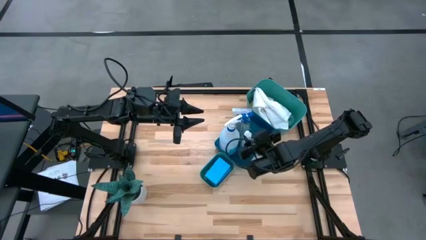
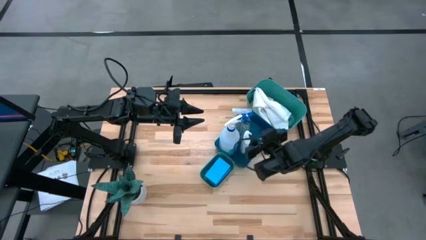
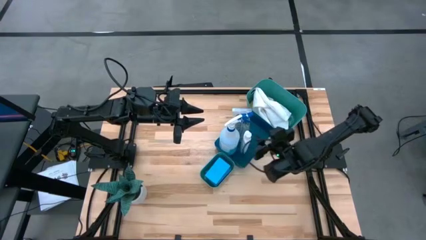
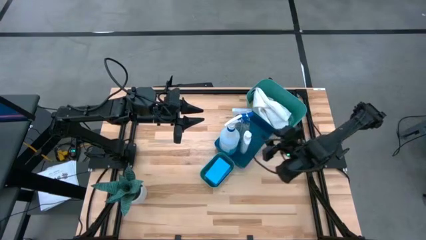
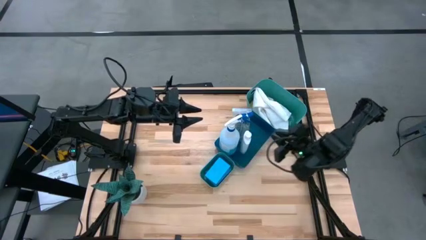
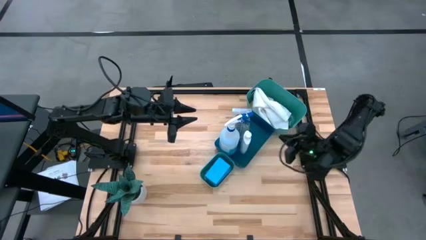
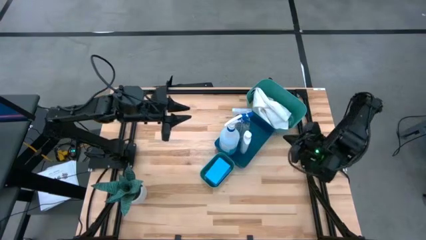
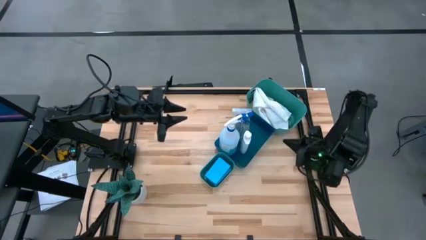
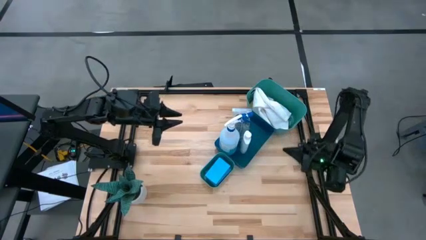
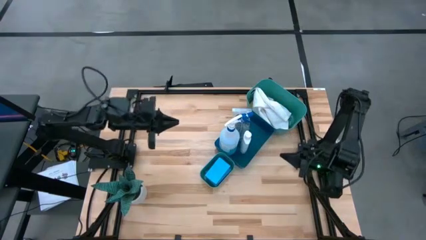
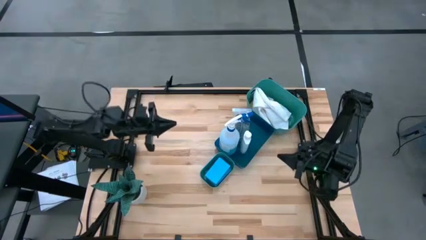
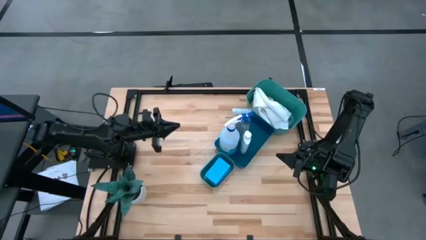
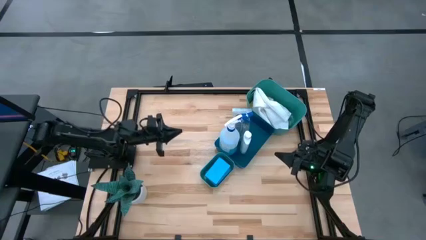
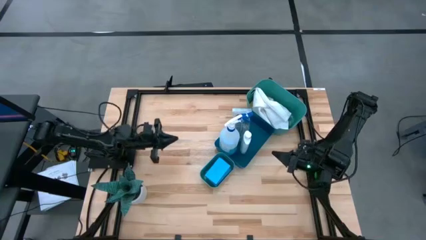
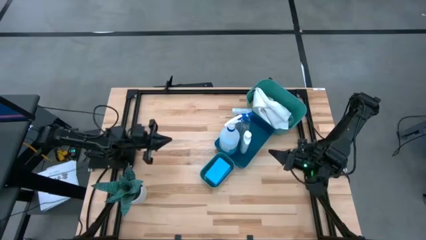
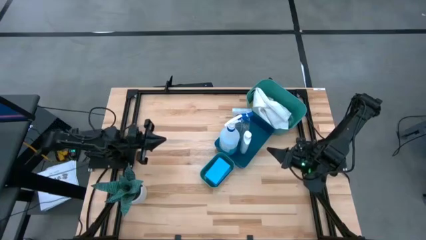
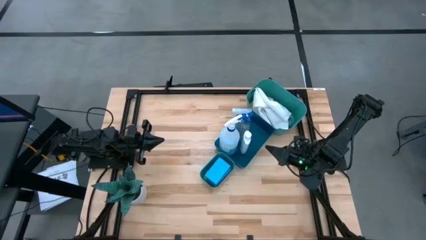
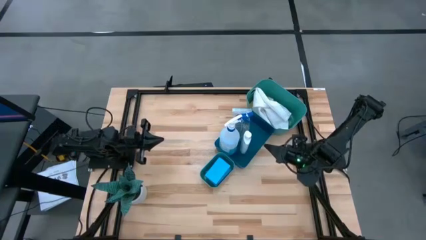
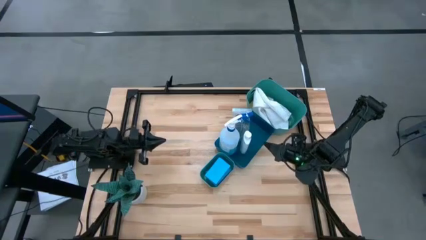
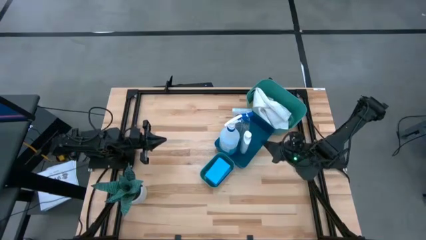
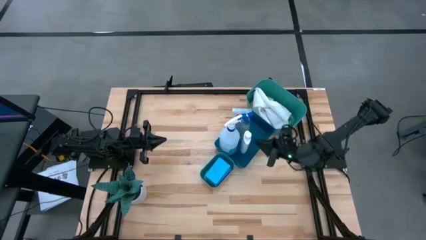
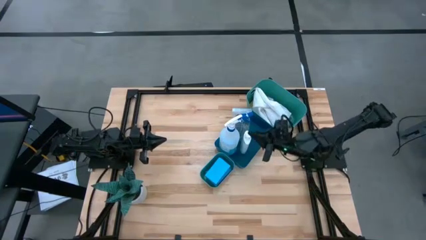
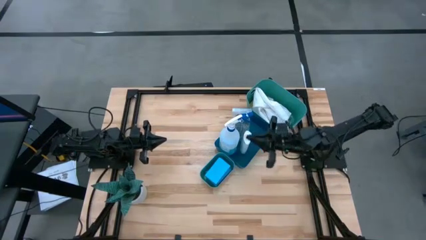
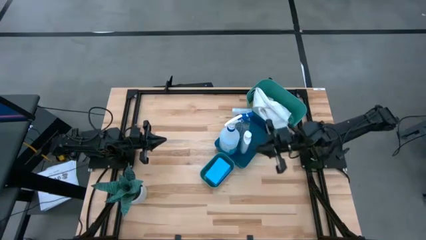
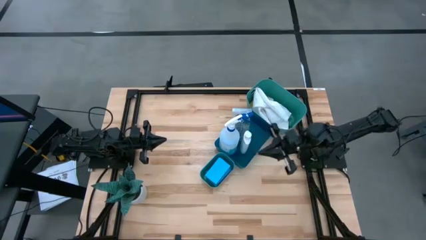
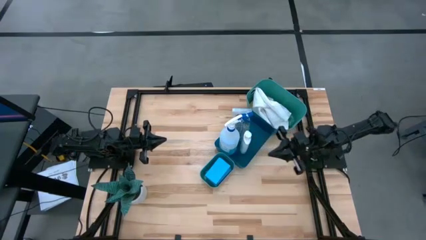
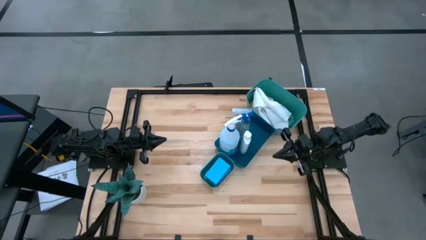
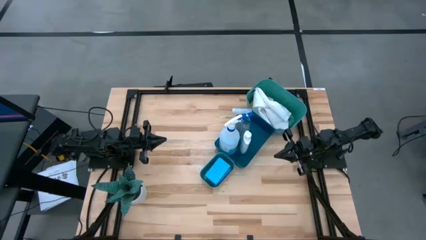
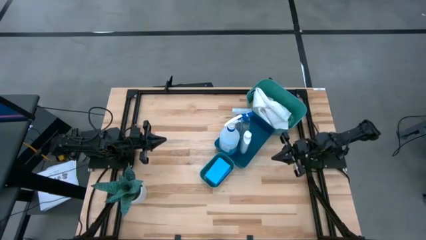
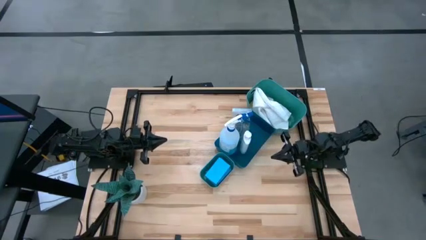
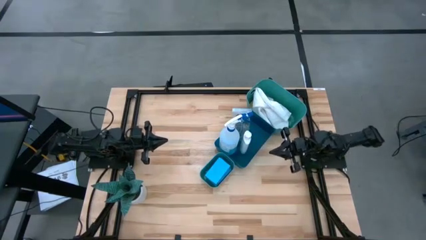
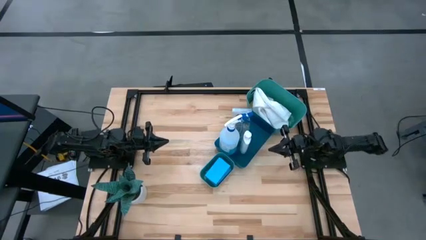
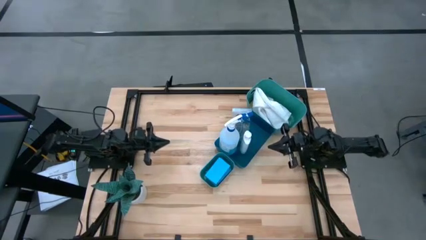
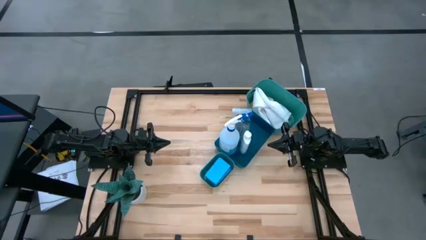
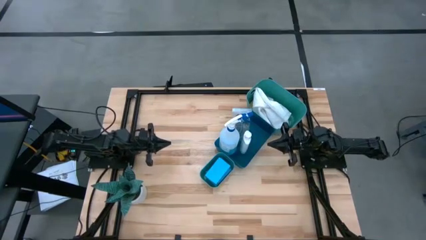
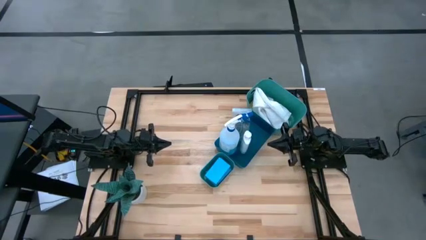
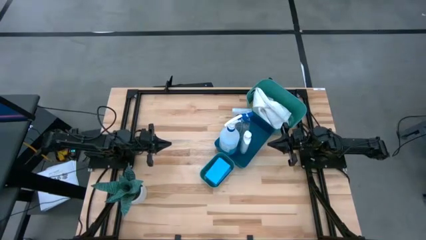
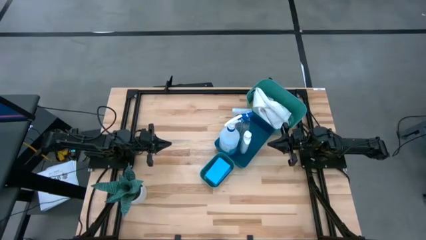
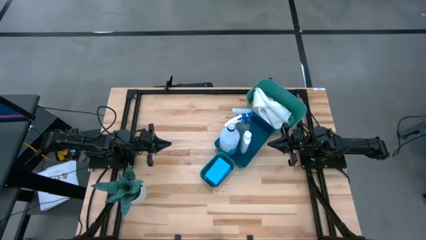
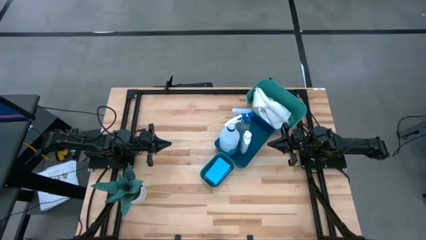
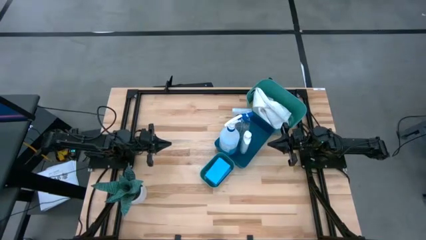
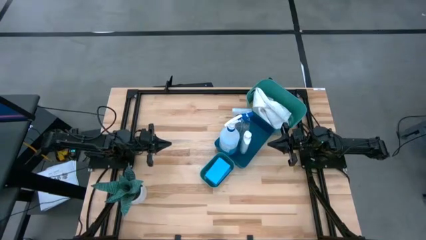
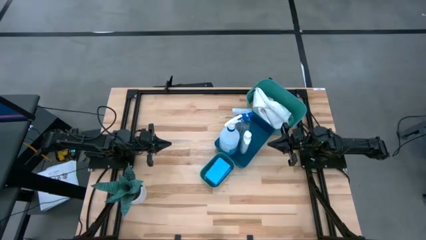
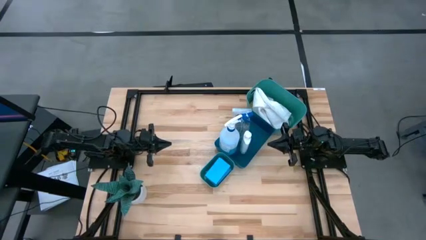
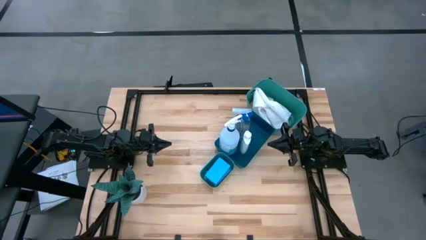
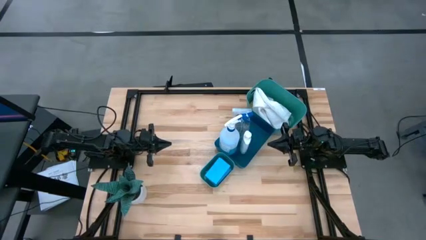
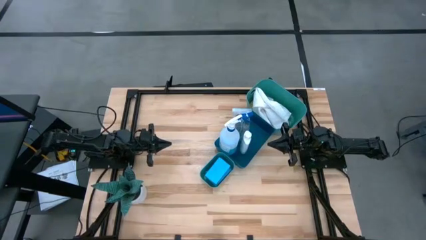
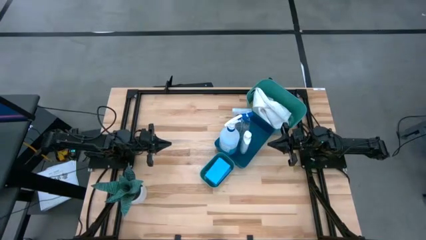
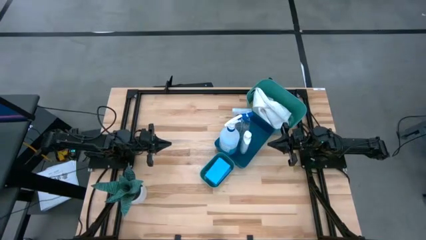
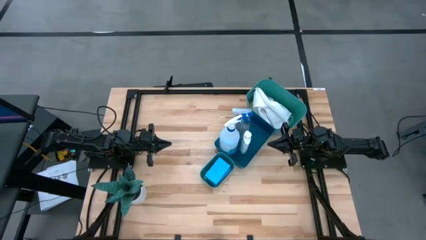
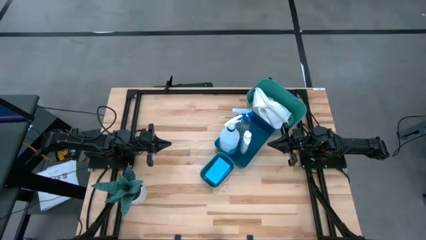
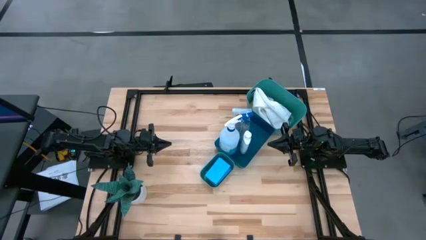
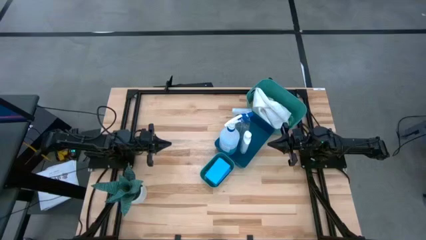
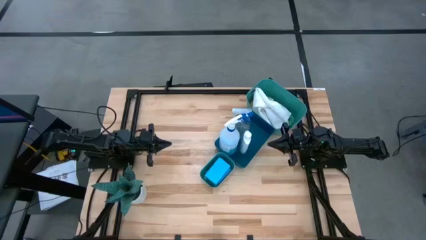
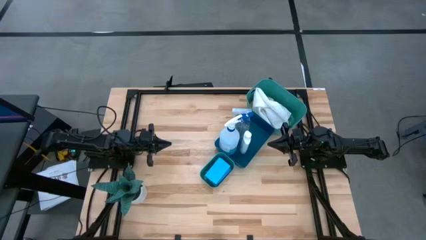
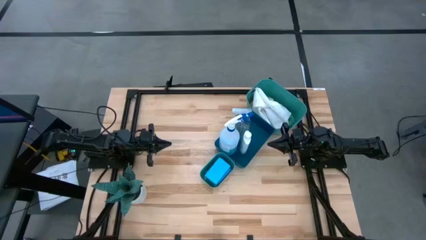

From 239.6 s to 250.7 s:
Task: Pick & Place Kitchen Items
Return to Home Position

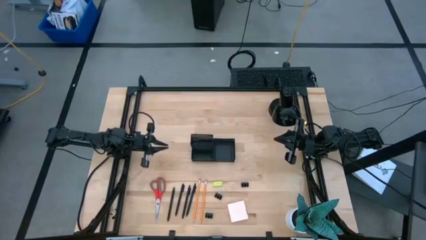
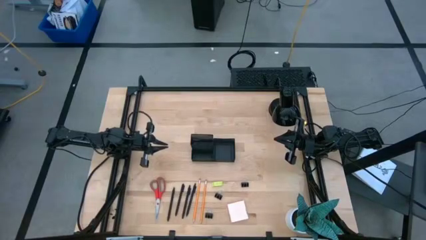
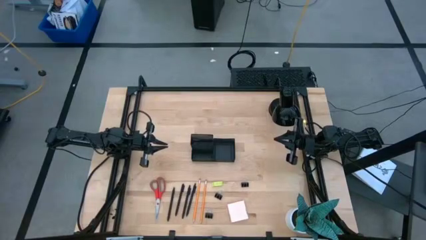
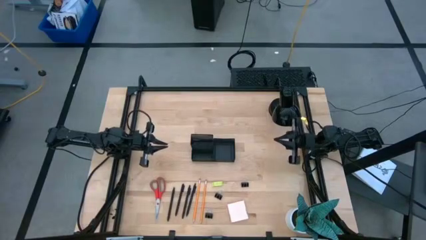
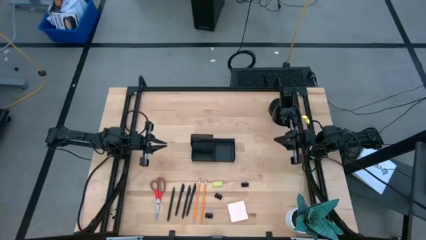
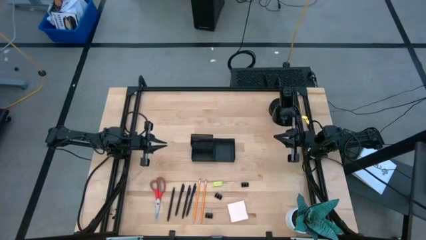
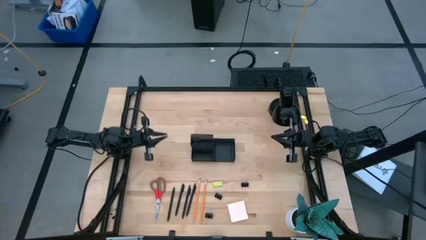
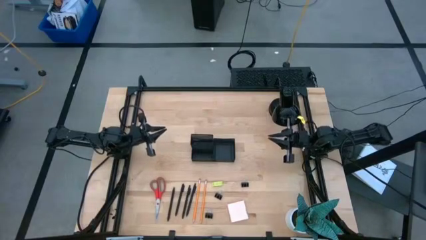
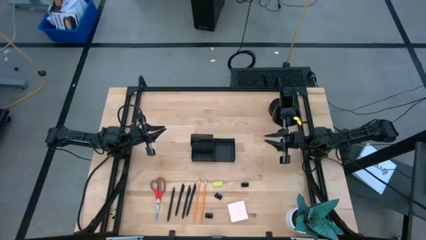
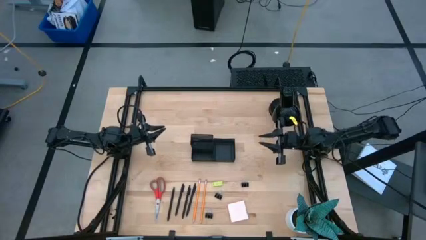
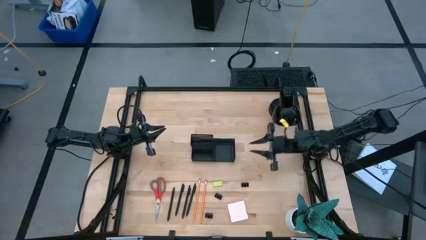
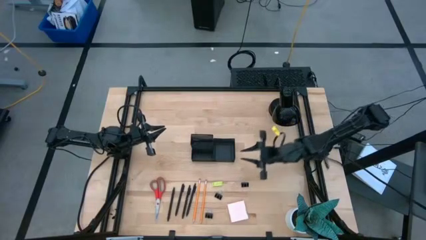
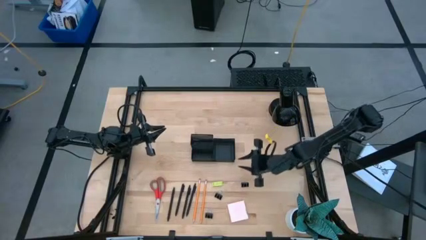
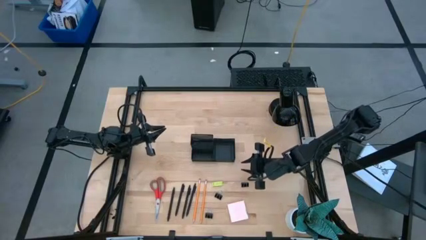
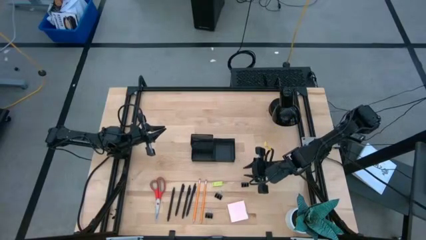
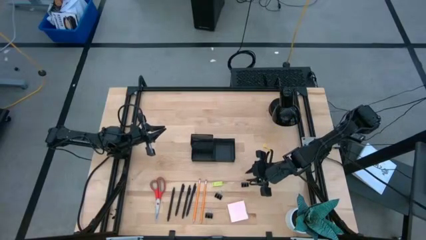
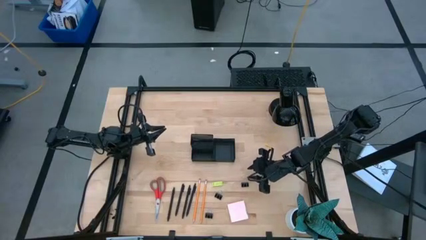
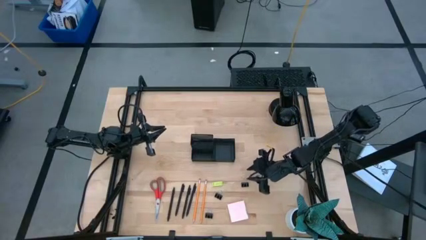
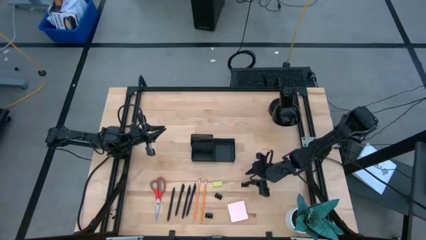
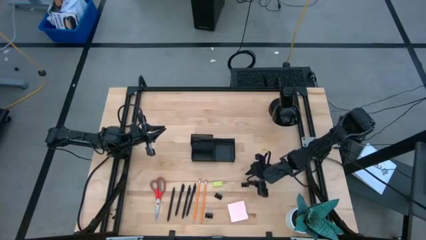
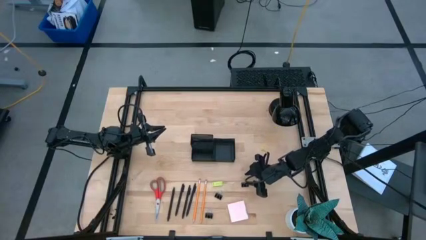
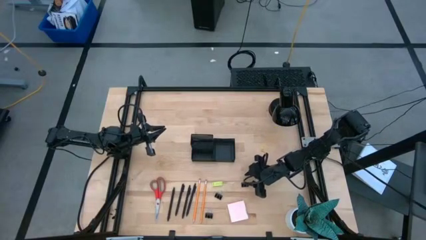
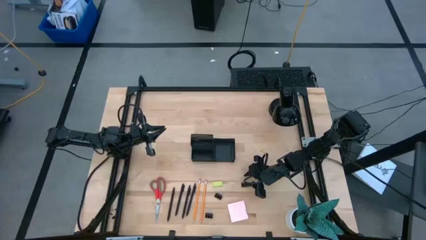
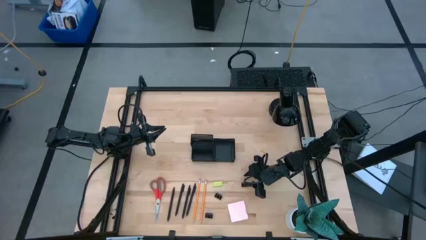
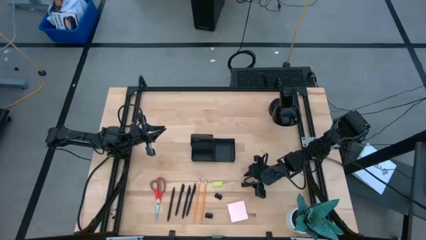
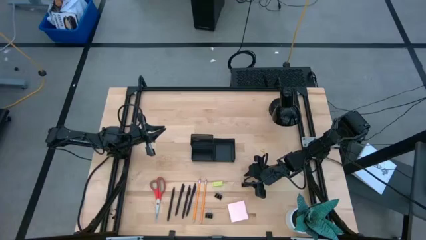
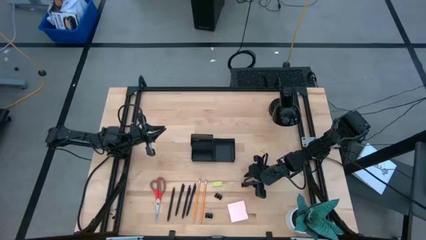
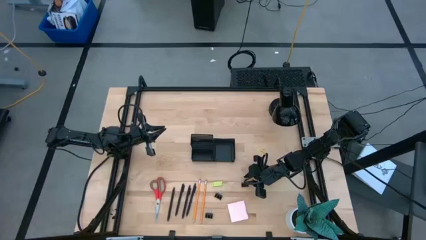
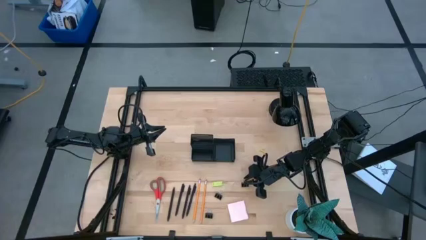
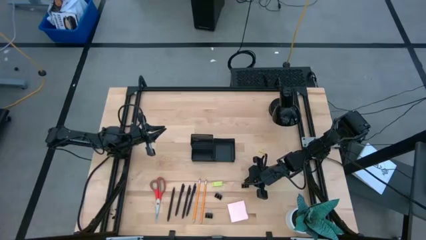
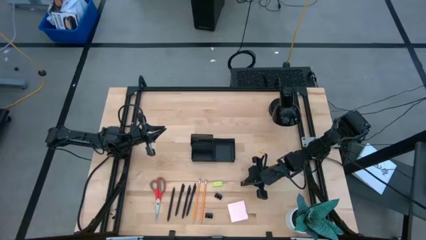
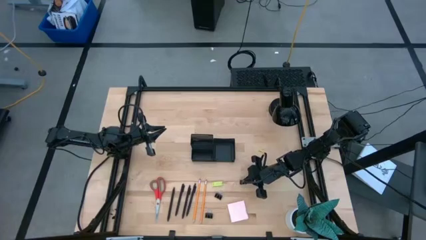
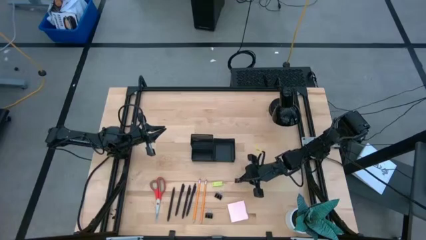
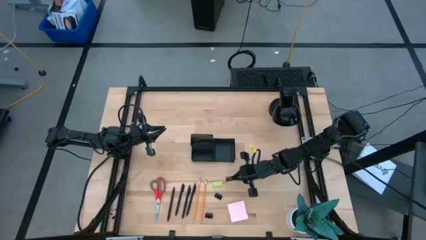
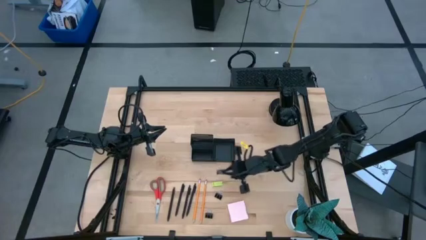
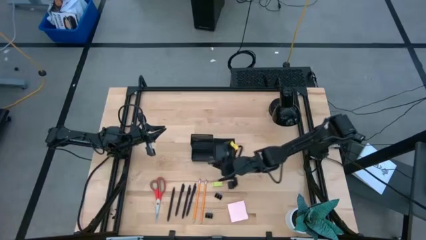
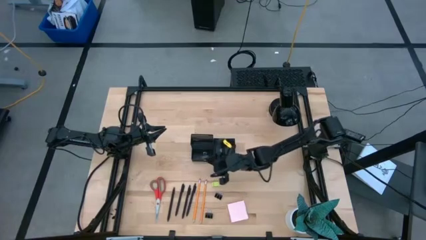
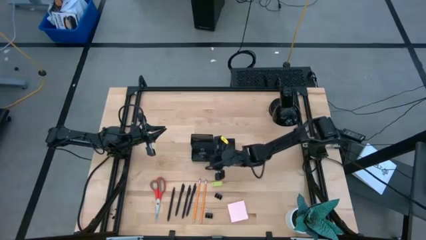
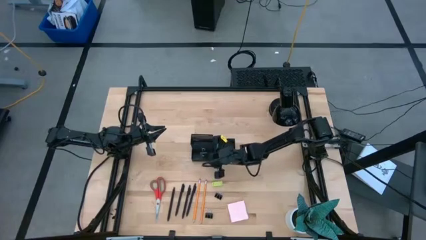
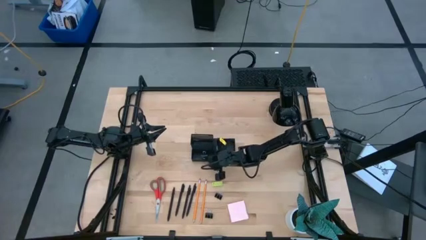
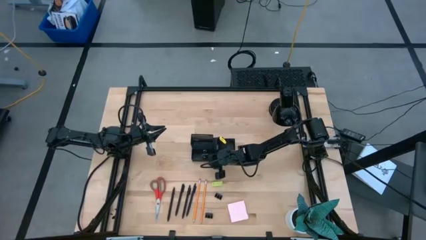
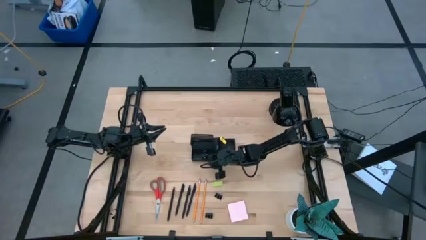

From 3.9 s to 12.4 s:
Task: Pick and place office supplies into organizer
Put the right black binder clip into the black desk organizer
